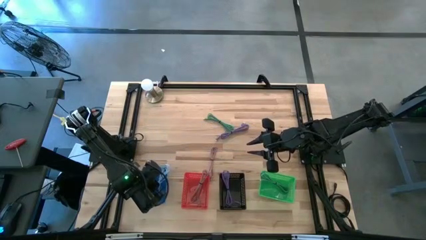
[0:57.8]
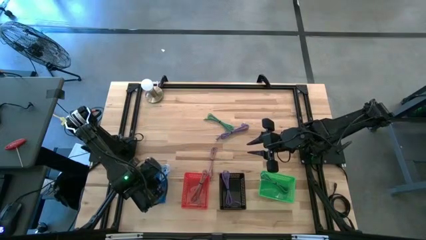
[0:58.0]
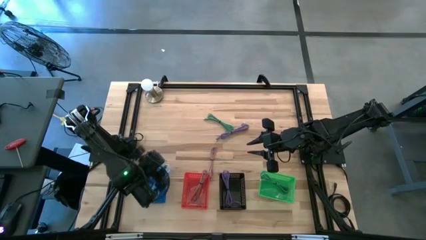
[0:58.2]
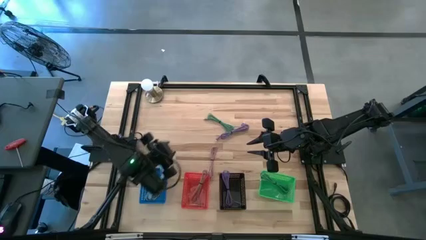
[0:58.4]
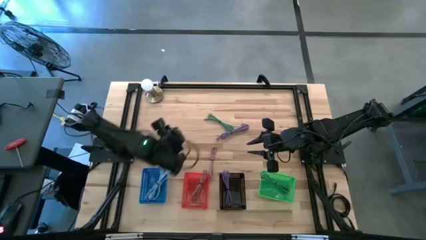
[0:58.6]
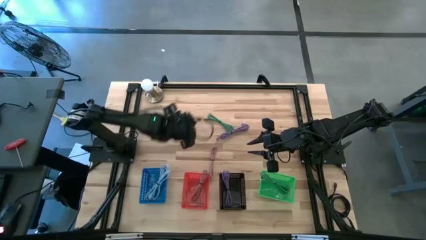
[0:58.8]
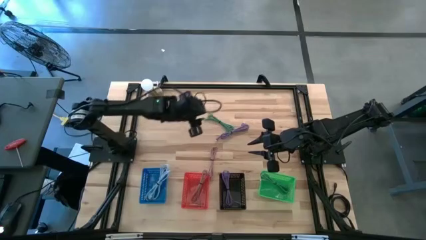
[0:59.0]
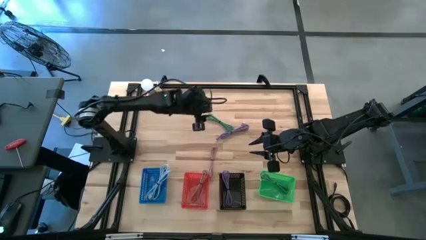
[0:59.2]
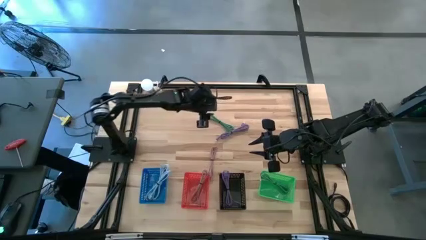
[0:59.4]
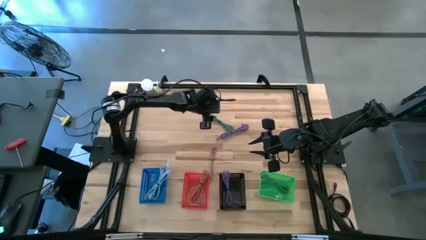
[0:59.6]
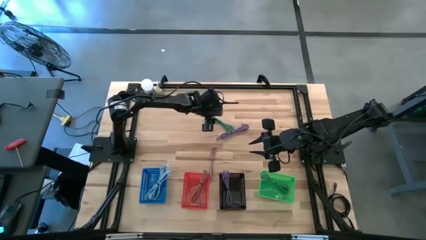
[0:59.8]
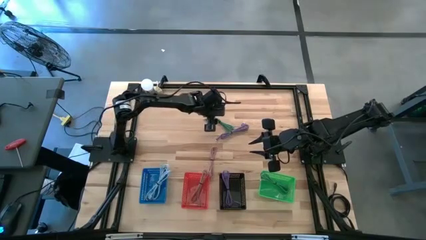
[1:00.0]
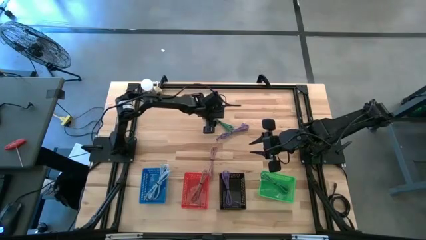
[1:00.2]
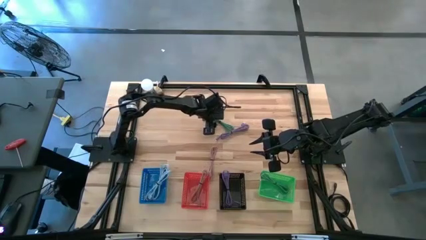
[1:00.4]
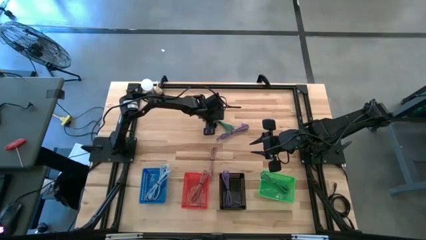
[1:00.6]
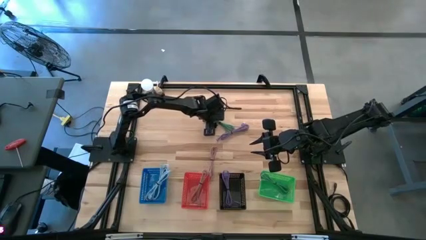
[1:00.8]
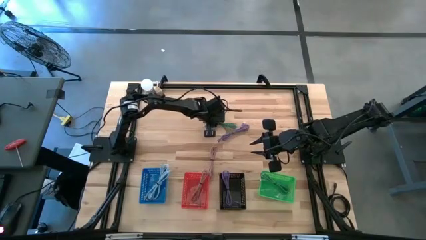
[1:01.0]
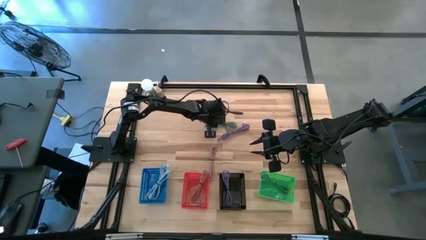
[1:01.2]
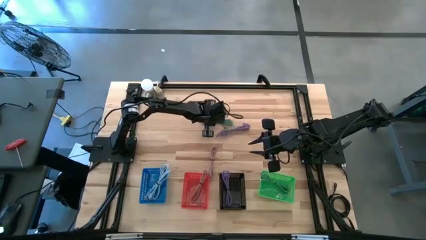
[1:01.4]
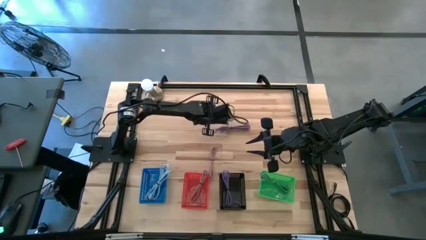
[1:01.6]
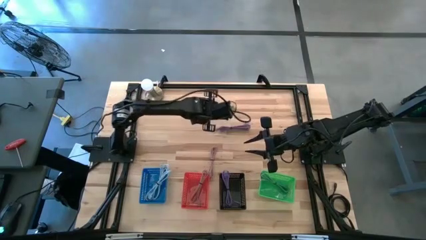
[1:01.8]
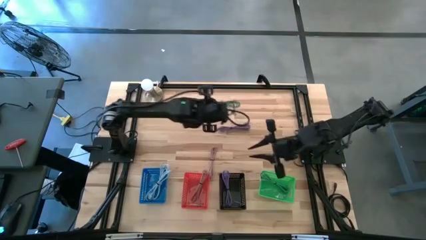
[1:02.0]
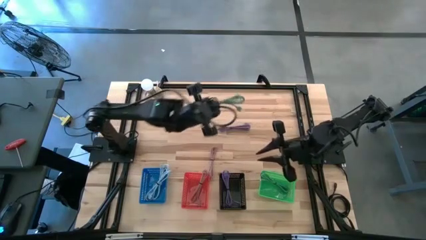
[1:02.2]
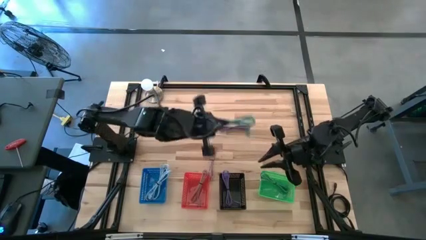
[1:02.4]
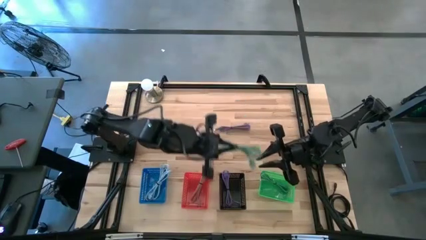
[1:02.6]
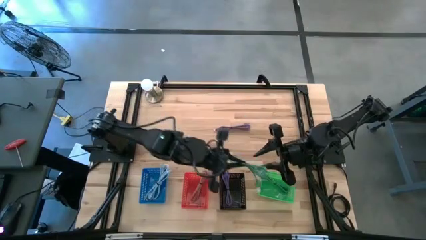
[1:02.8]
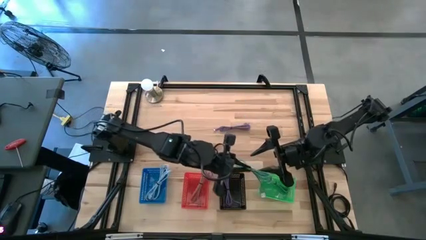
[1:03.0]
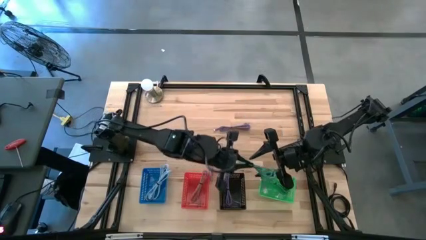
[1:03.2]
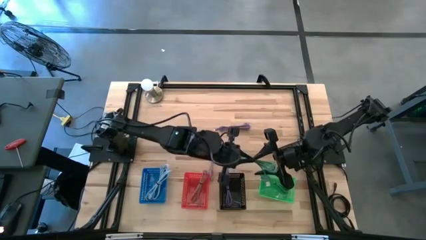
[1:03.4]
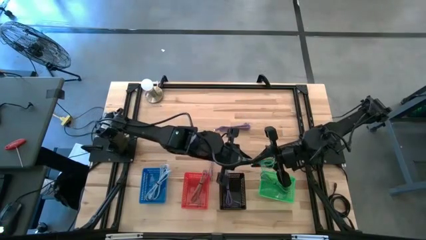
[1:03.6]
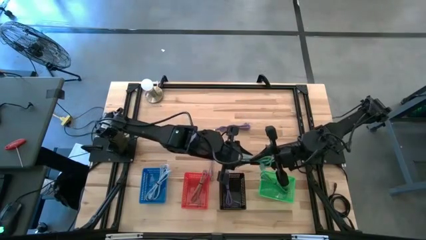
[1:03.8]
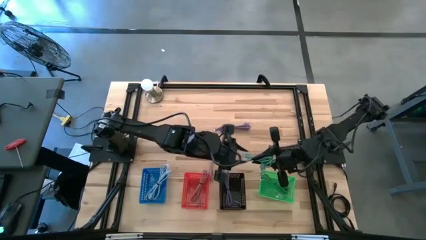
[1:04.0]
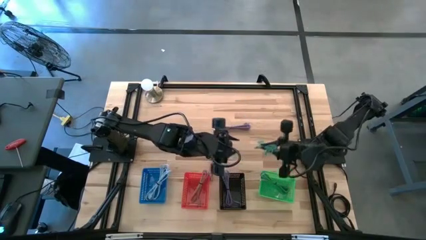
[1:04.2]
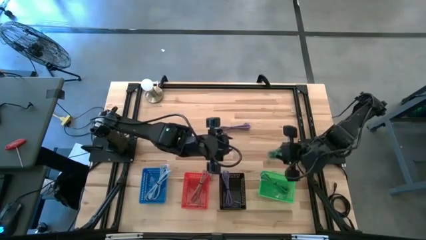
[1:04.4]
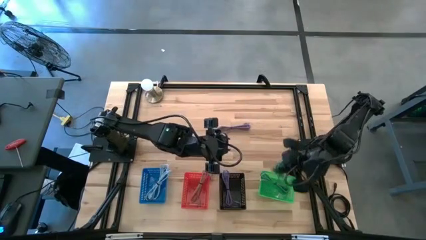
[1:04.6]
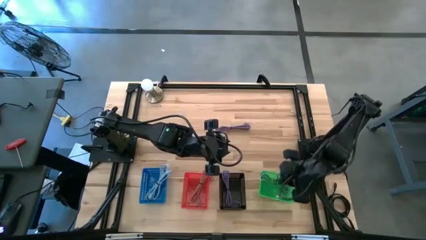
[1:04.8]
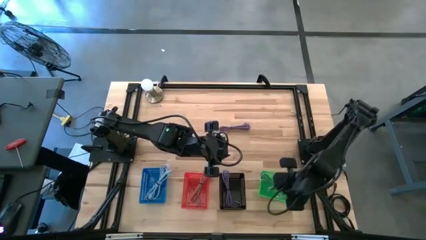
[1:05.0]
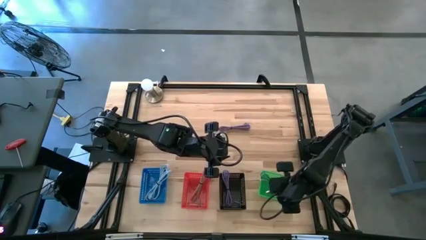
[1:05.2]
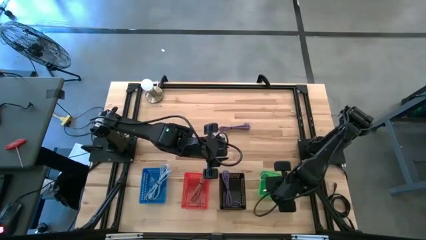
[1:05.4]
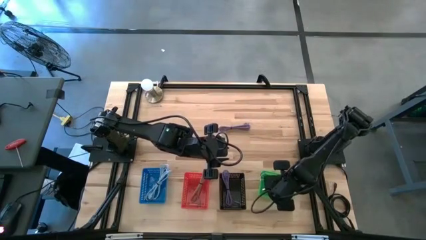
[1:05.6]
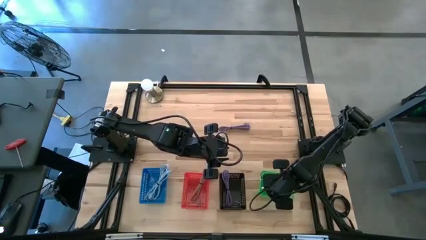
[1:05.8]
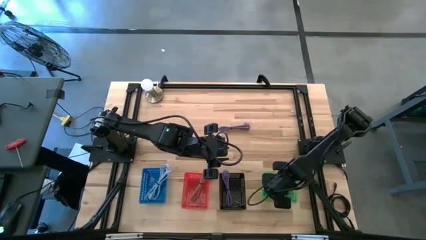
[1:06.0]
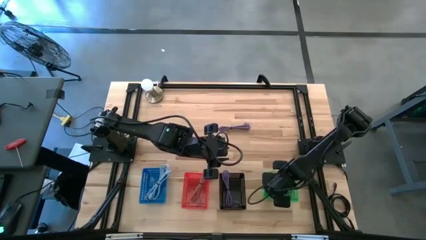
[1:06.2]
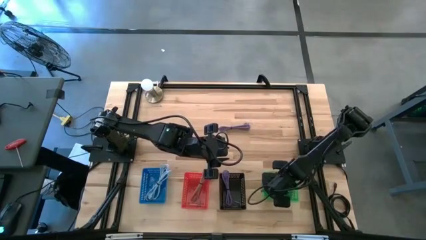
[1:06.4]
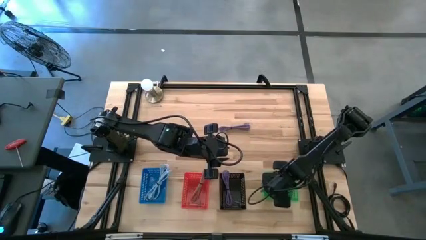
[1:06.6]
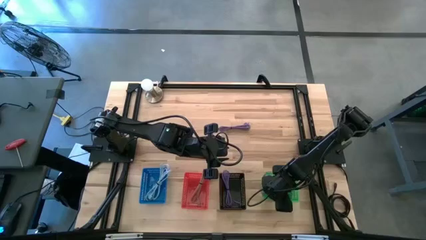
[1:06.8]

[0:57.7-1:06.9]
Task: Pick & Place USB Port
Put the green charger cable into the green bin

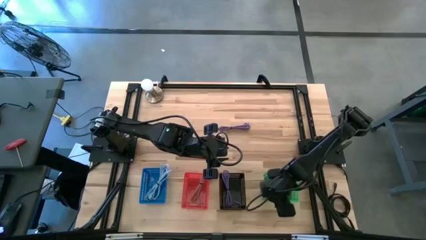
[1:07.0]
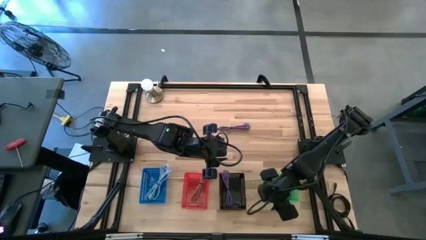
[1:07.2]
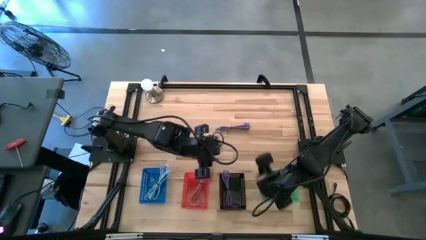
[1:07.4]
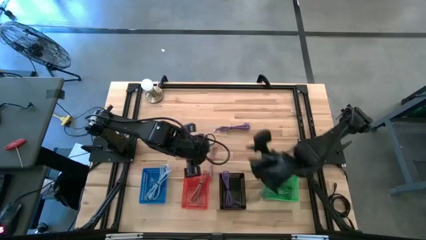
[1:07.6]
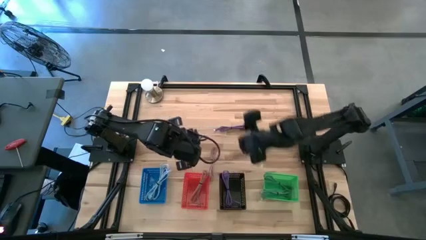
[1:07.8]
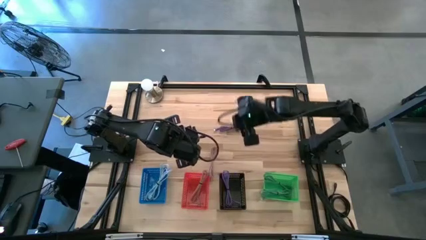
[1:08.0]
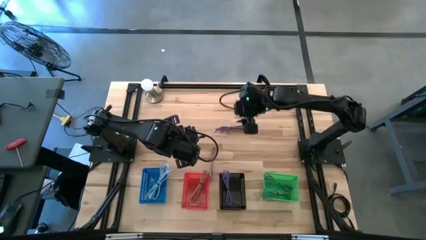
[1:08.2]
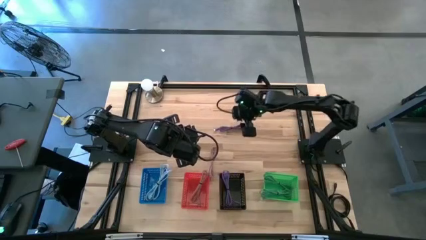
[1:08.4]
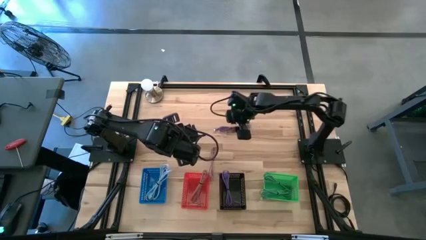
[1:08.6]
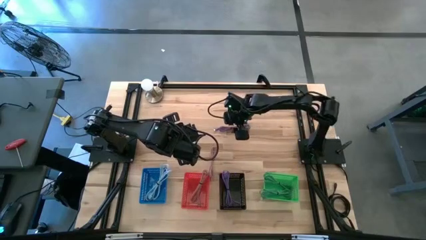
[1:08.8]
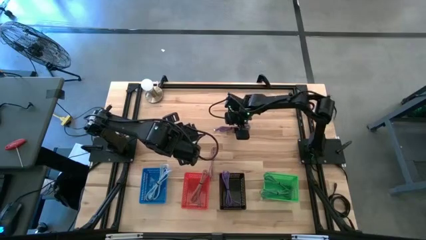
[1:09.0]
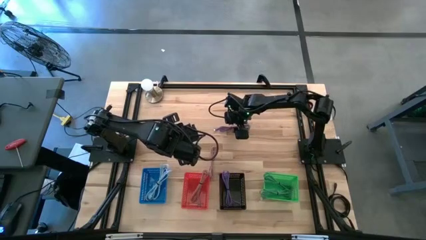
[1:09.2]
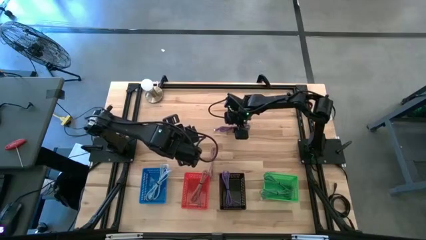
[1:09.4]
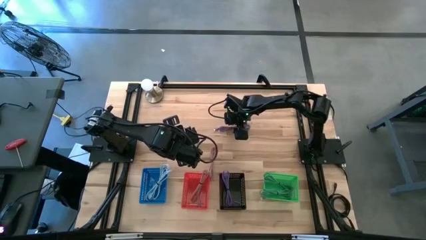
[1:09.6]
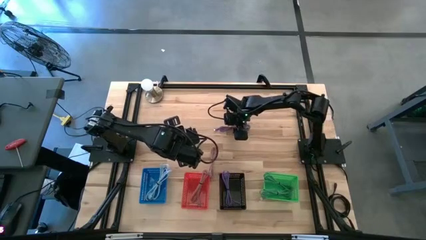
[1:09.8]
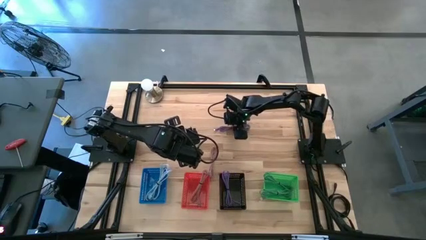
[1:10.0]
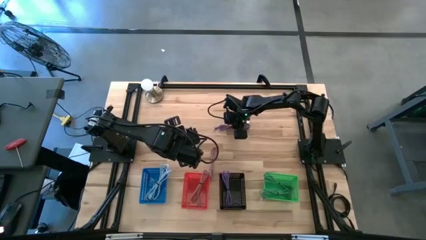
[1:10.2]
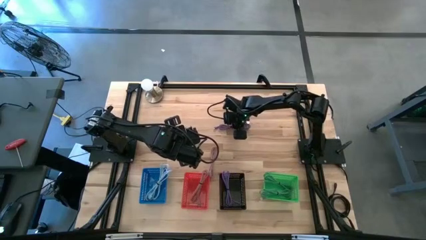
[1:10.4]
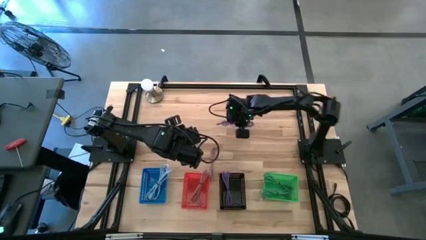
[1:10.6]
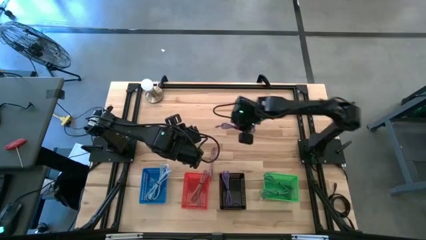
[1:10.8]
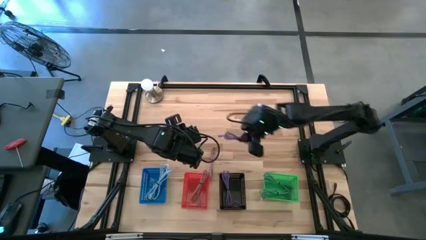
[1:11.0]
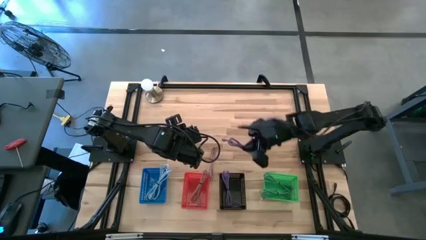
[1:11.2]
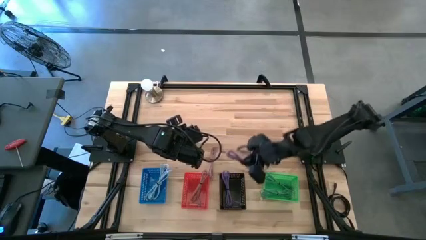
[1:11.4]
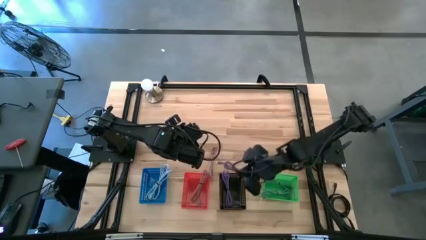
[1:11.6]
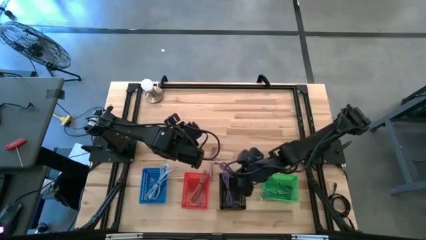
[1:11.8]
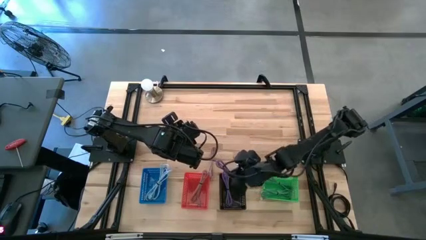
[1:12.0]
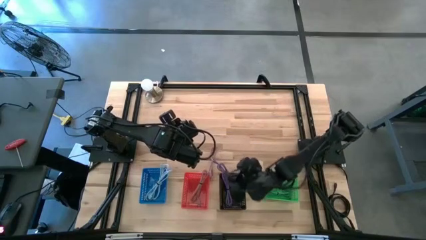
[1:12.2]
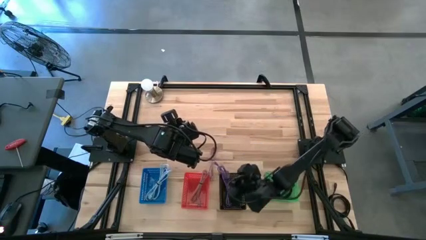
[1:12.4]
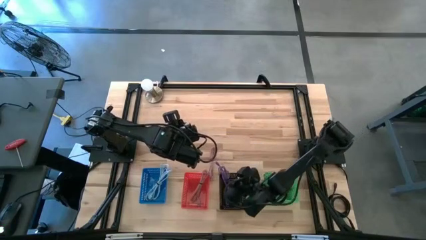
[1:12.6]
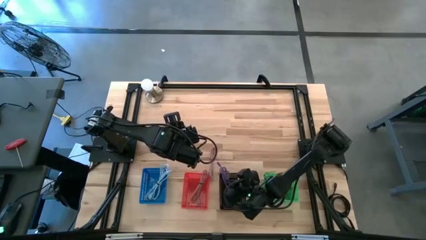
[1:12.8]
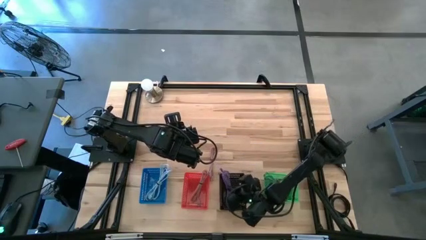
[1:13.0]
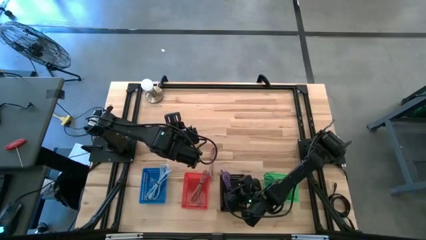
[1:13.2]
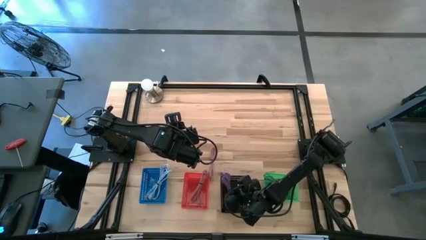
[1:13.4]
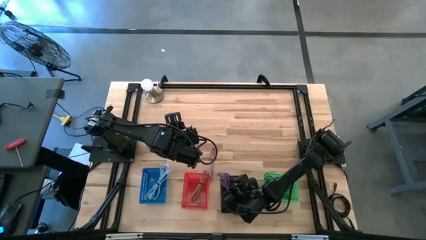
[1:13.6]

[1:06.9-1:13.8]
Put the violet charger cable into the black bin
